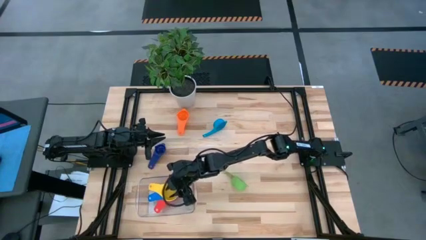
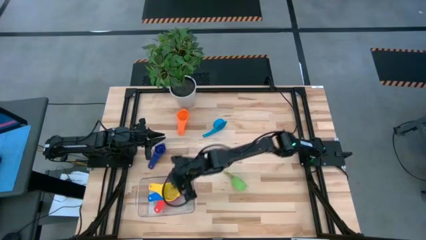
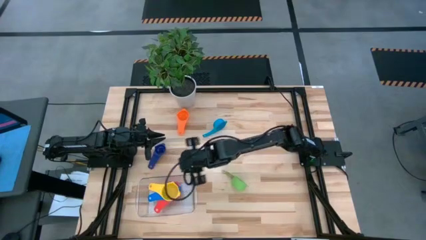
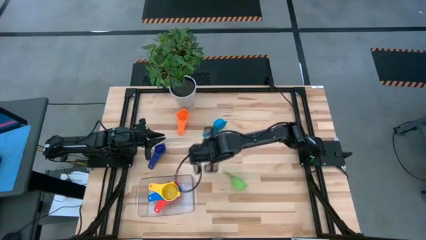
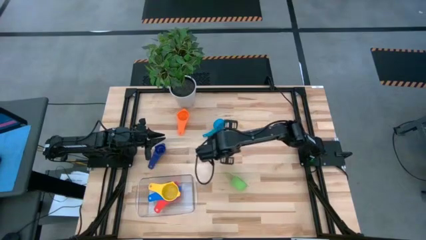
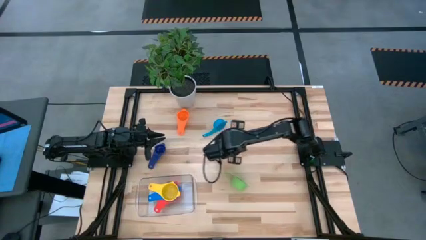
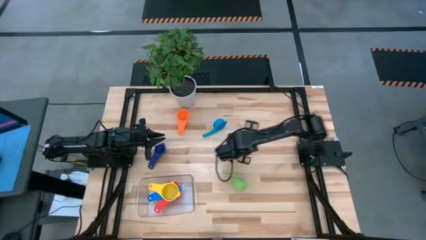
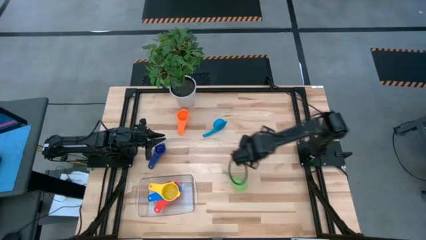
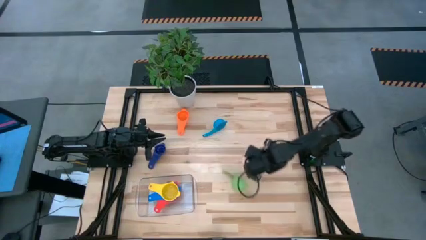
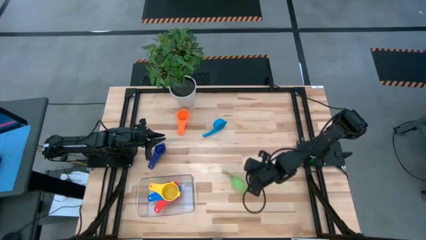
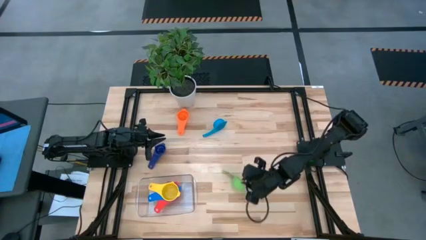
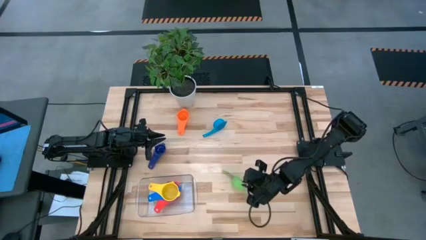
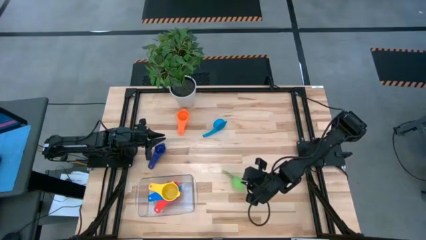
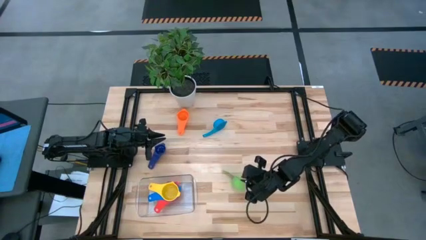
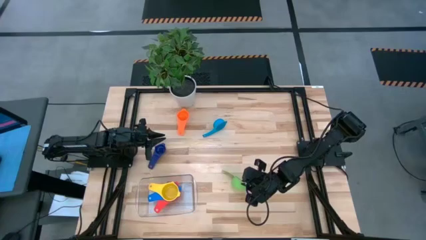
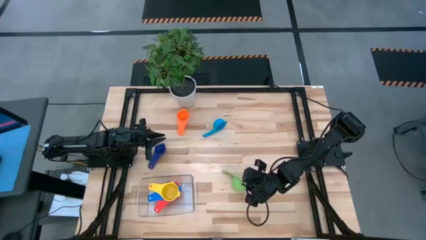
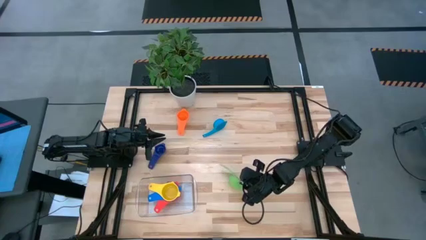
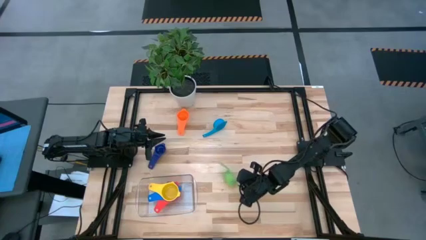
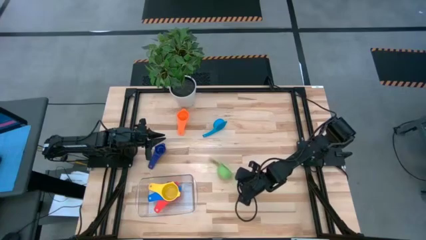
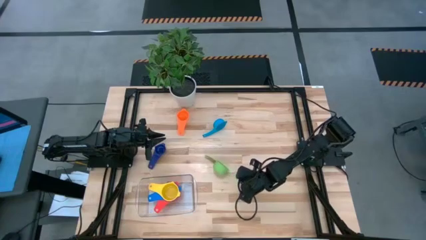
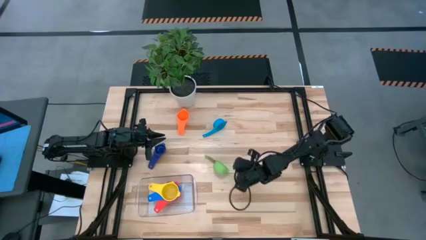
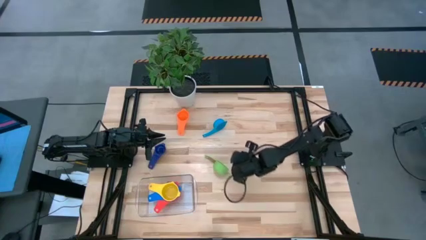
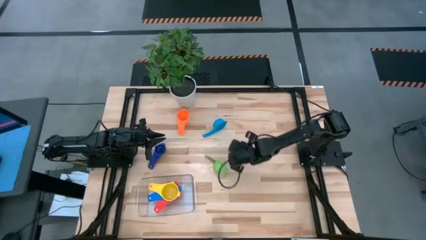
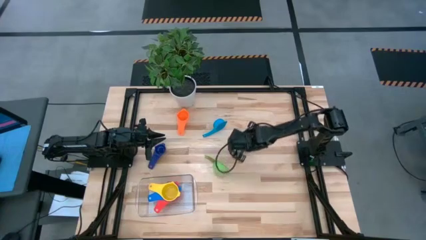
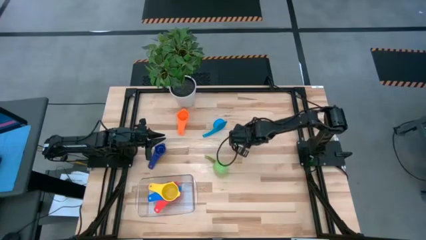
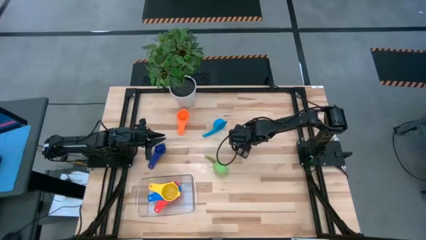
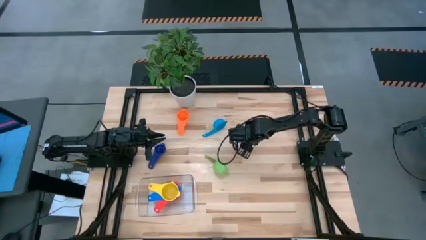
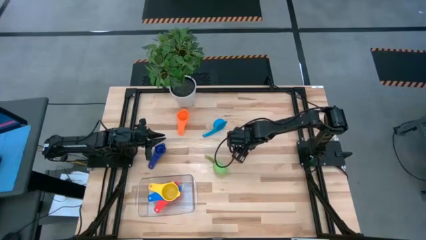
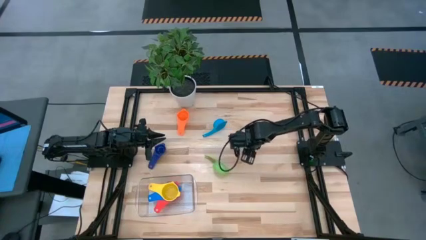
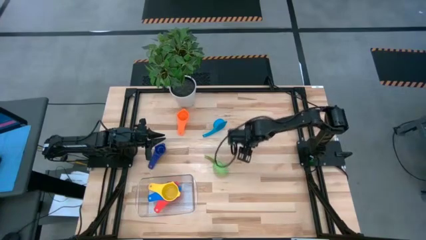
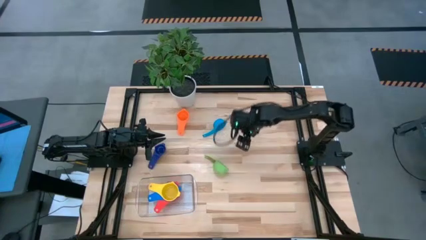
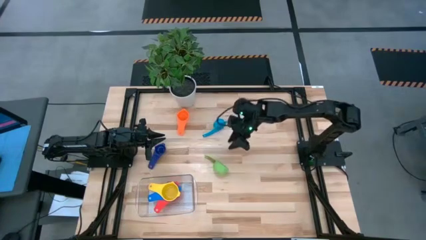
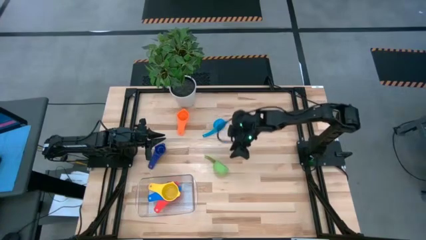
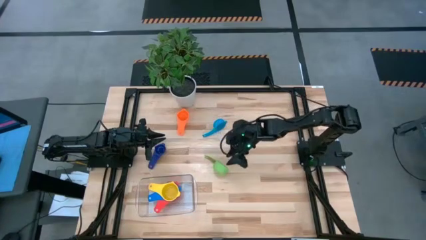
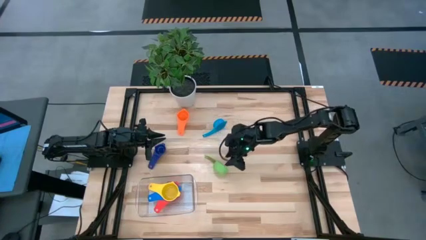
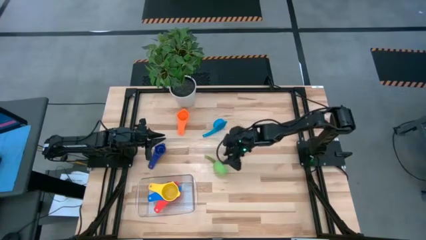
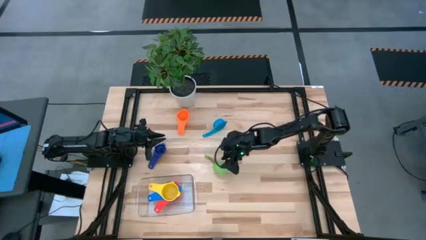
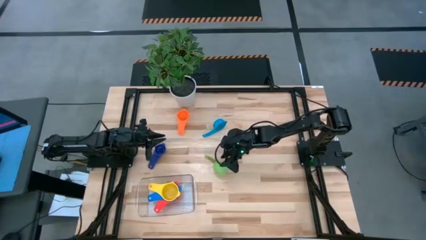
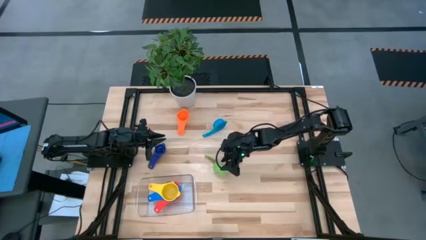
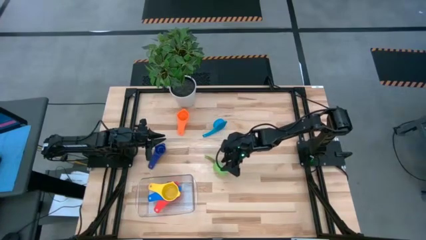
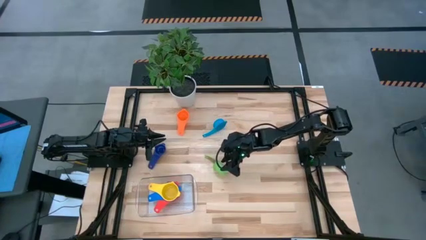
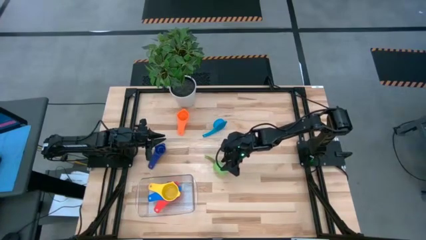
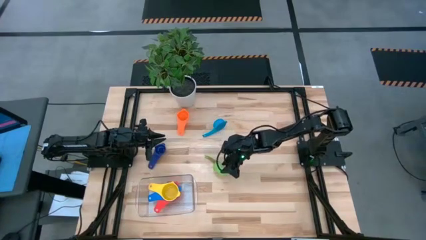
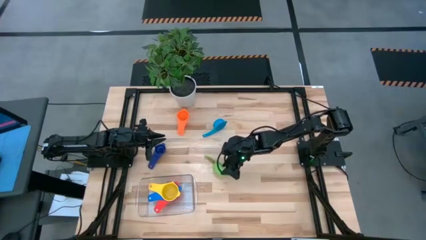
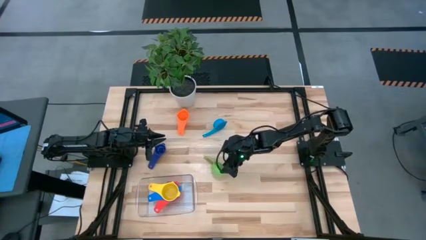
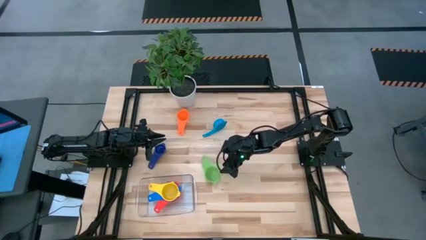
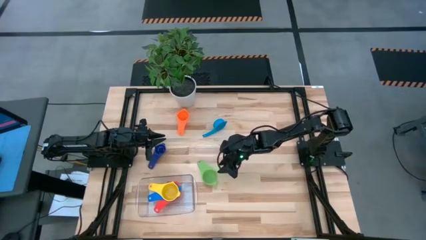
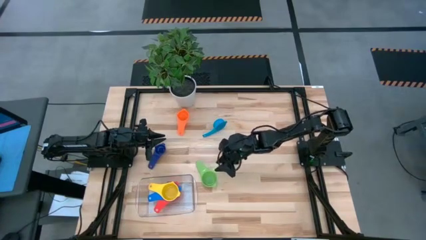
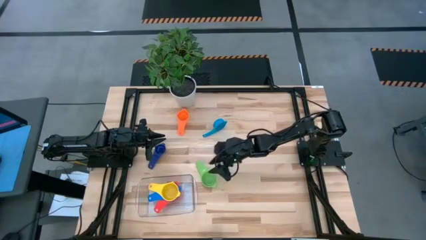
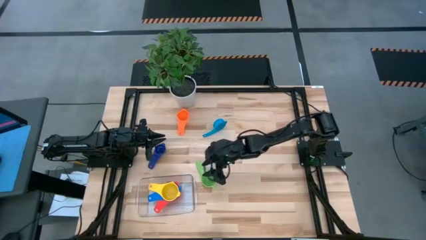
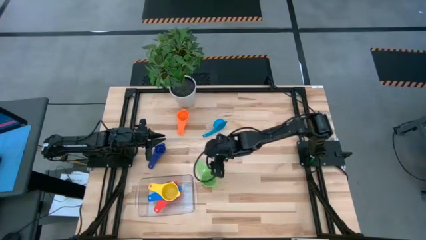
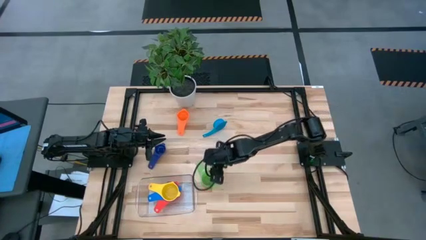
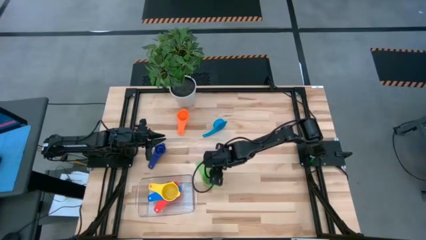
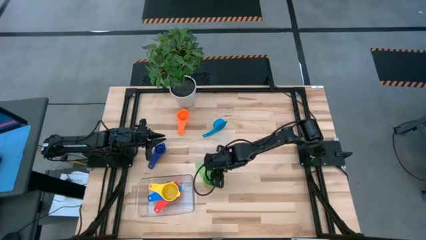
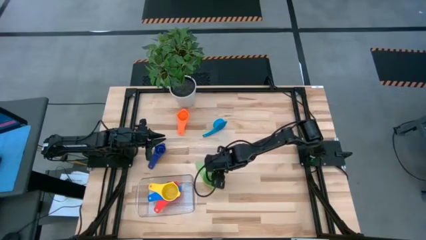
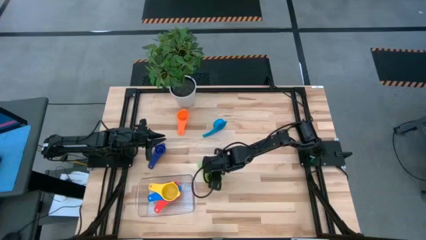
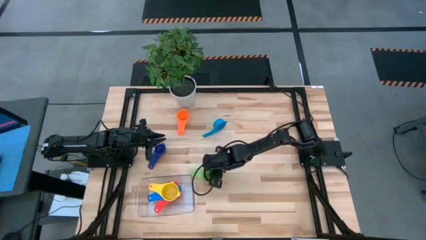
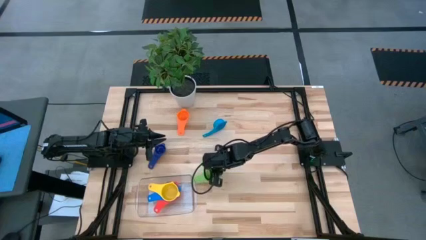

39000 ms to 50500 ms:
Task: Nest measuring cups in basket
Stack the green measuring cup on top of the yellow measuring cup

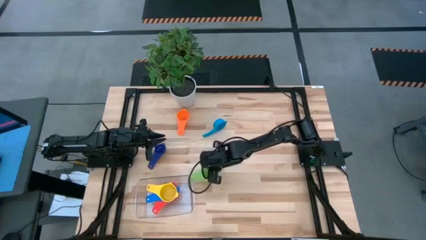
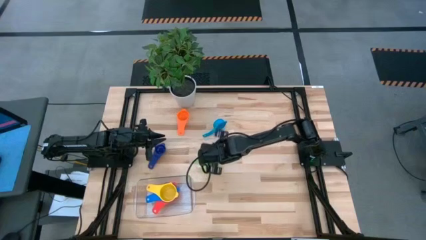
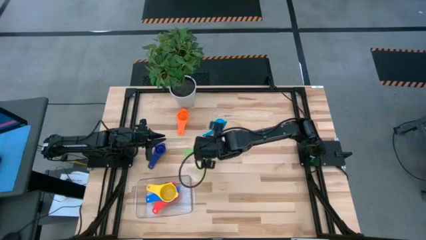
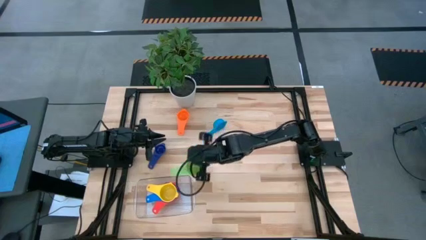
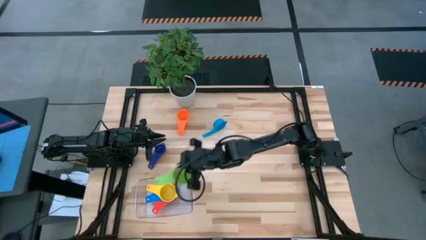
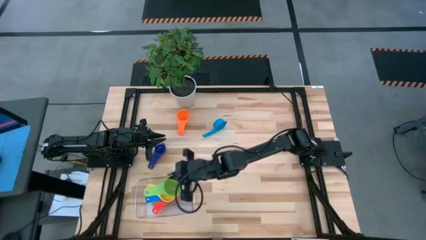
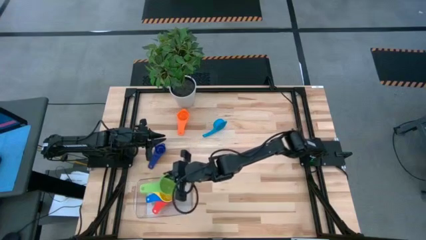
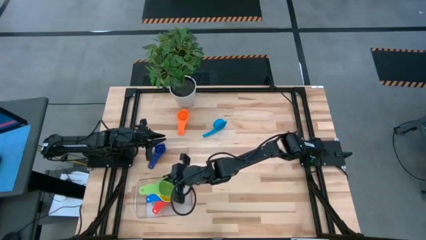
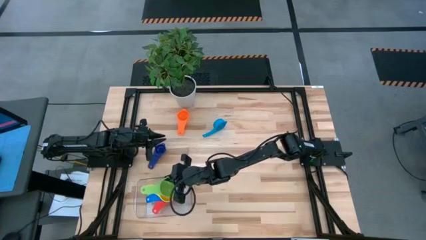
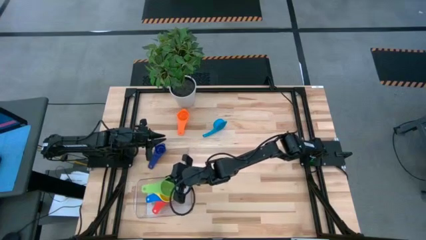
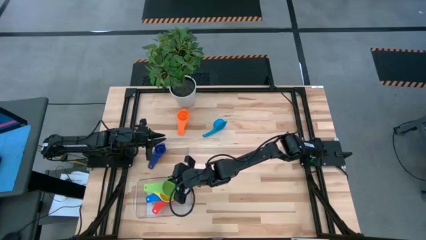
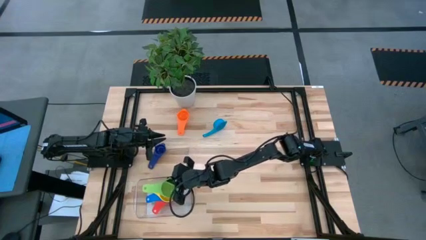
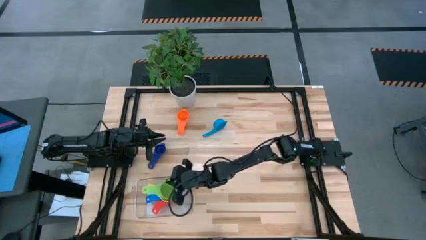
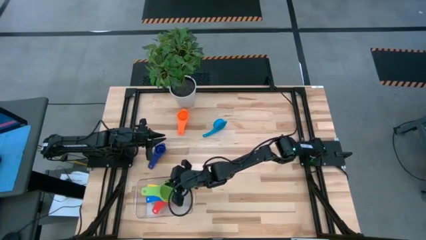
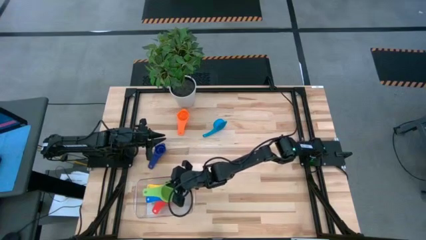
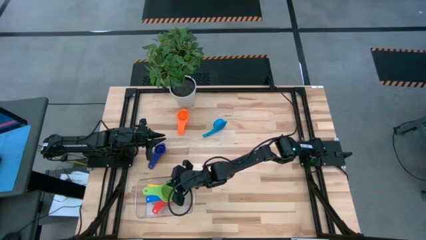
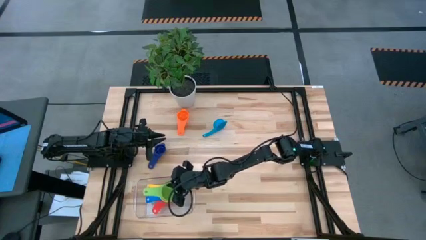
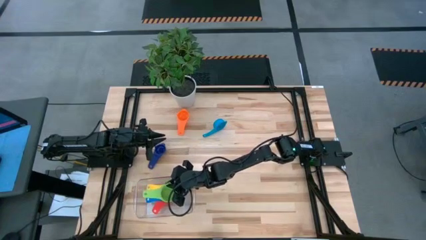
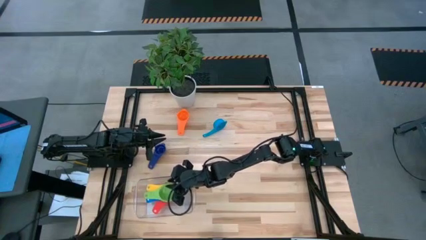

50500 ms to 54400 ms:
Stack the green measuring cup on top of the yellow measuring cup
